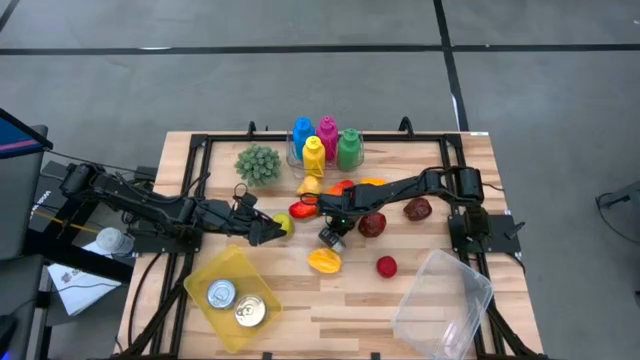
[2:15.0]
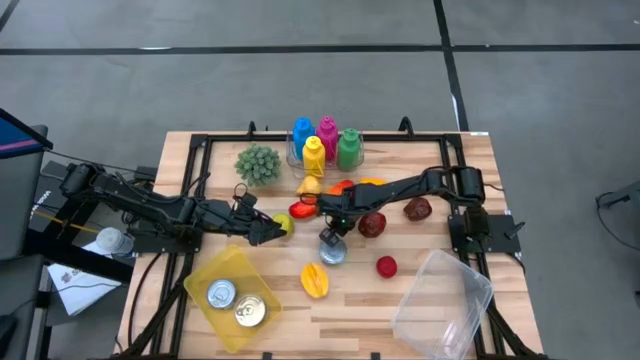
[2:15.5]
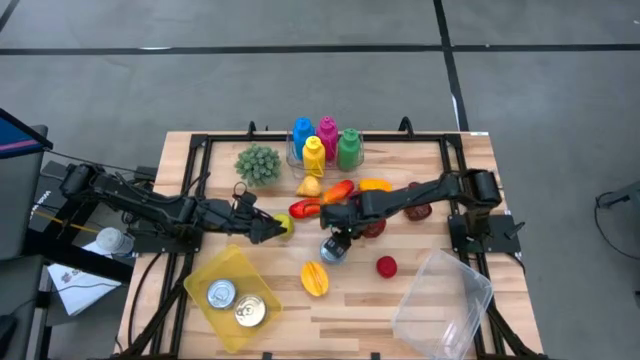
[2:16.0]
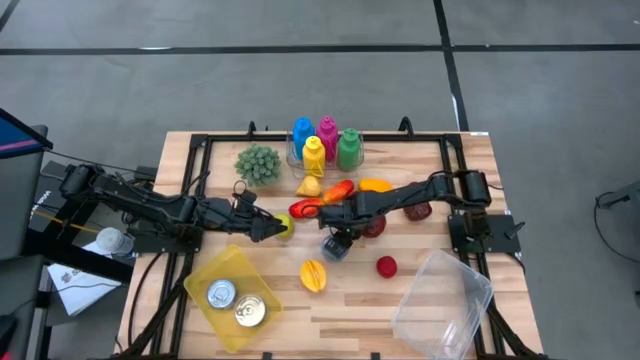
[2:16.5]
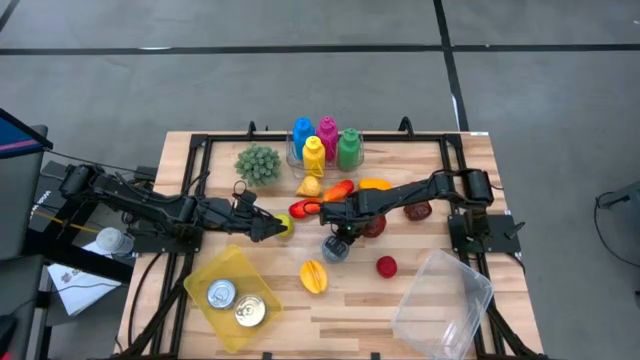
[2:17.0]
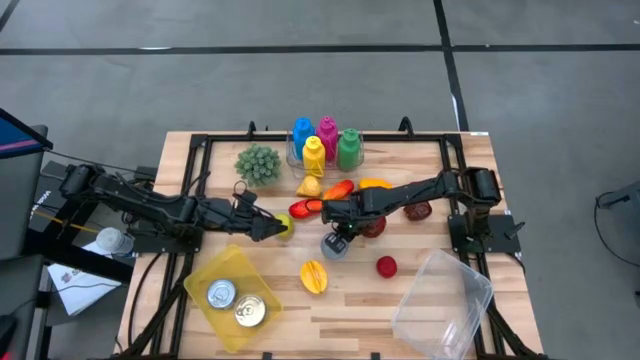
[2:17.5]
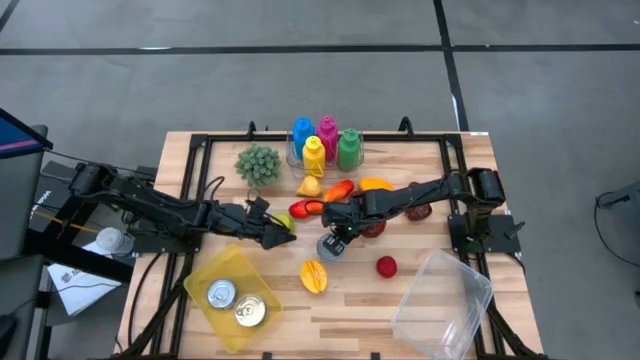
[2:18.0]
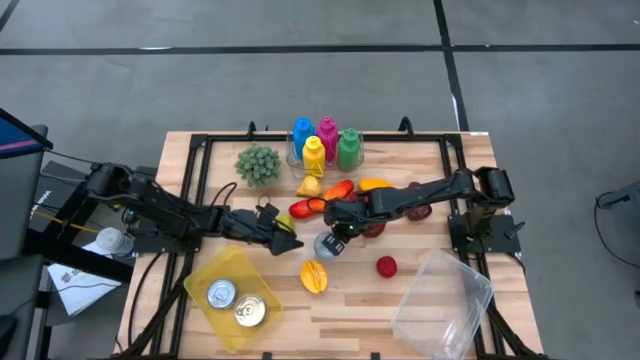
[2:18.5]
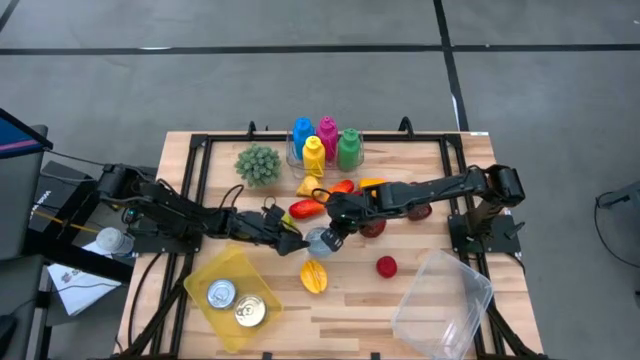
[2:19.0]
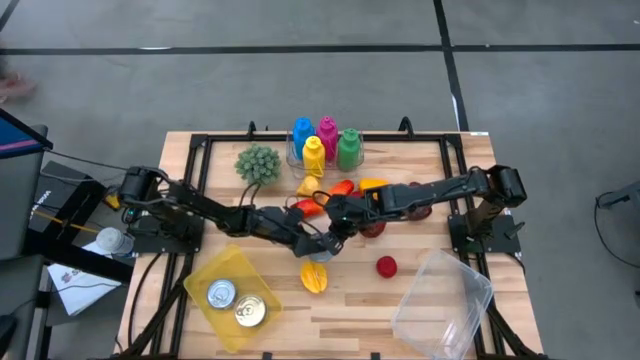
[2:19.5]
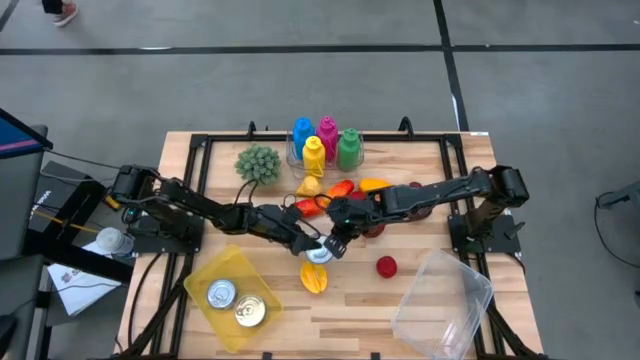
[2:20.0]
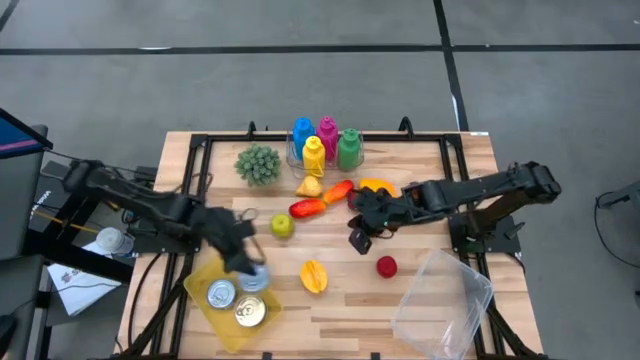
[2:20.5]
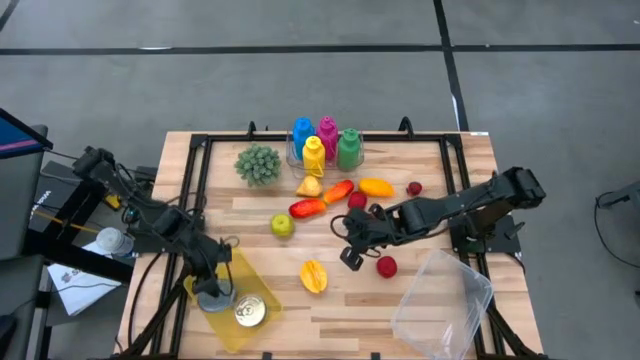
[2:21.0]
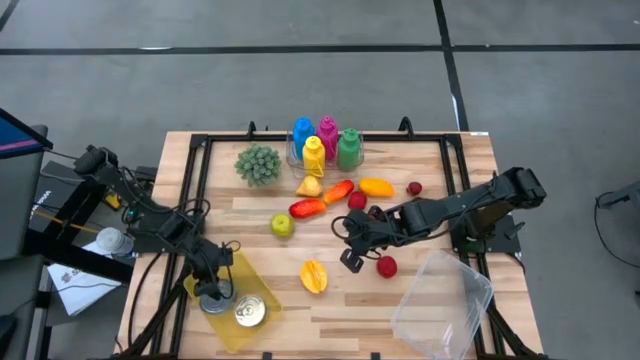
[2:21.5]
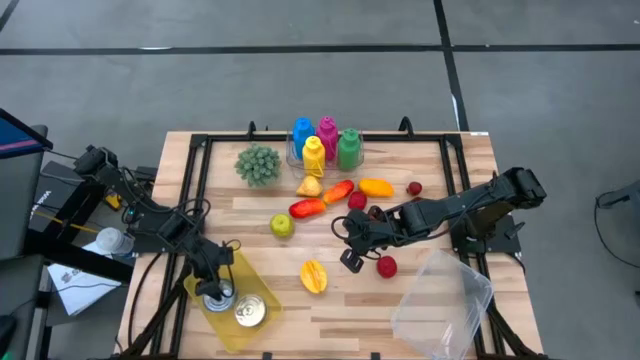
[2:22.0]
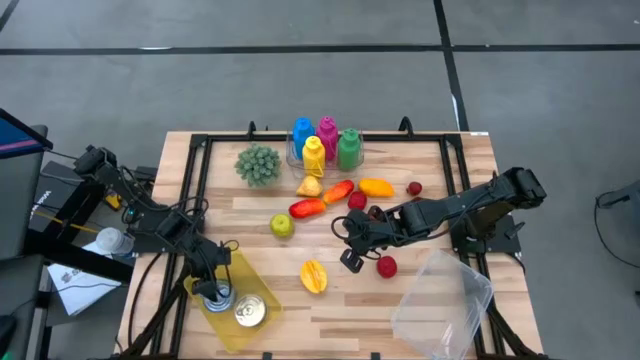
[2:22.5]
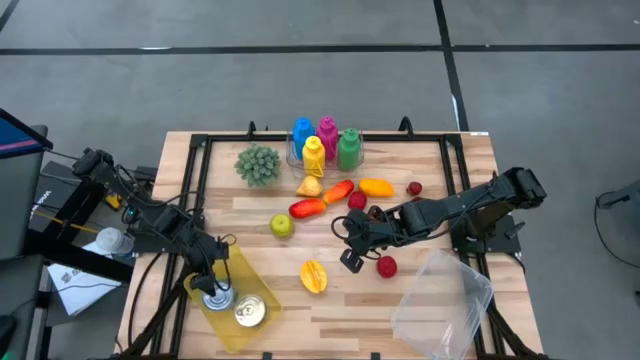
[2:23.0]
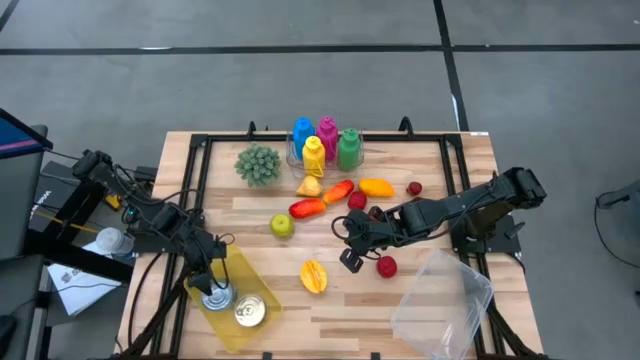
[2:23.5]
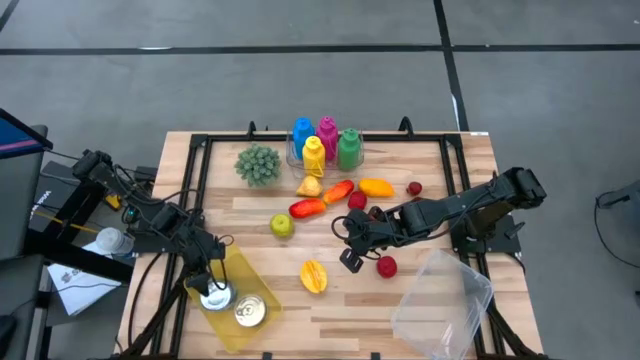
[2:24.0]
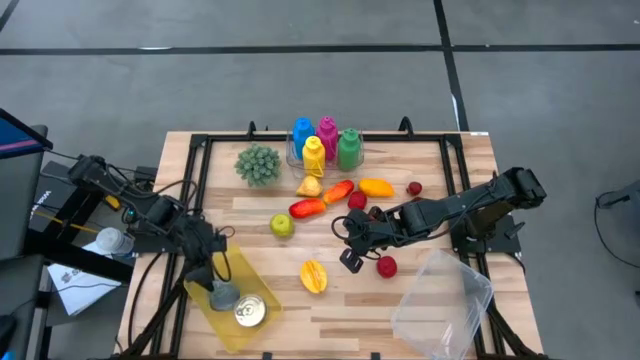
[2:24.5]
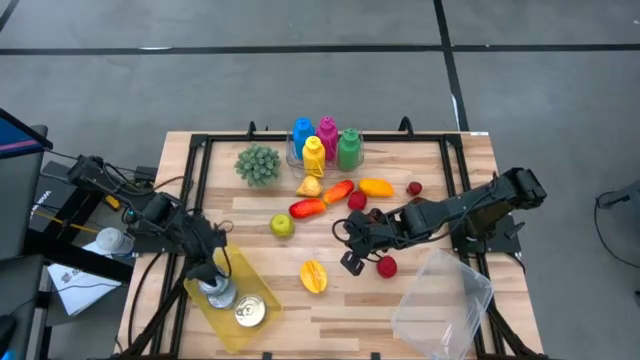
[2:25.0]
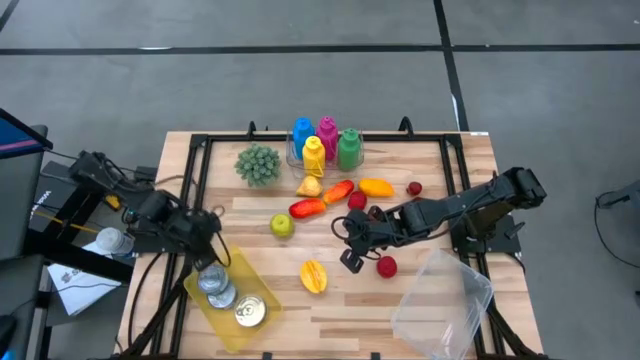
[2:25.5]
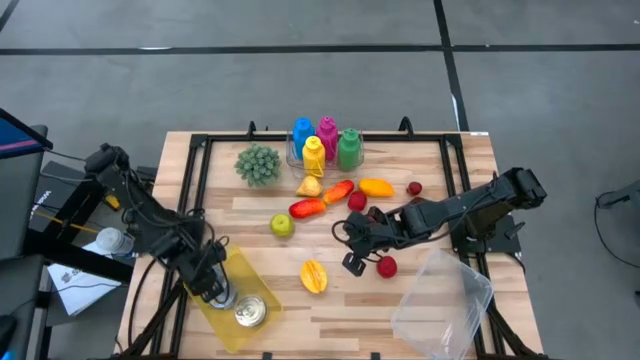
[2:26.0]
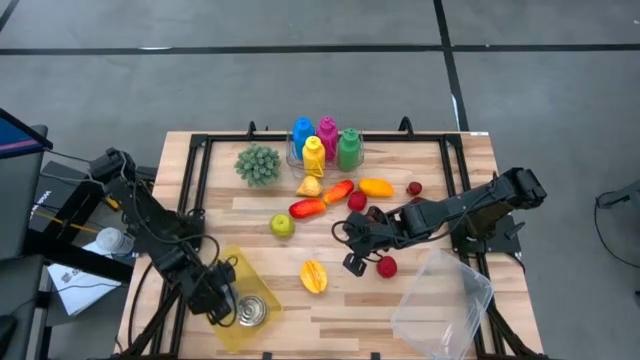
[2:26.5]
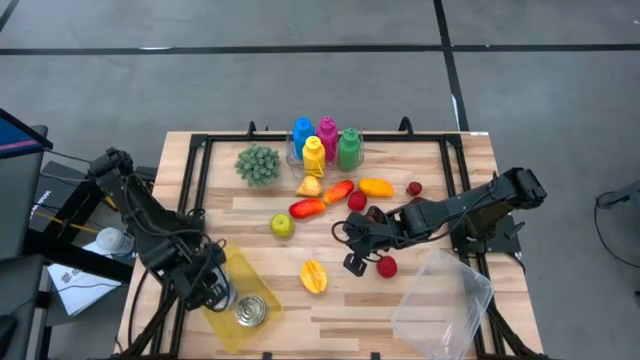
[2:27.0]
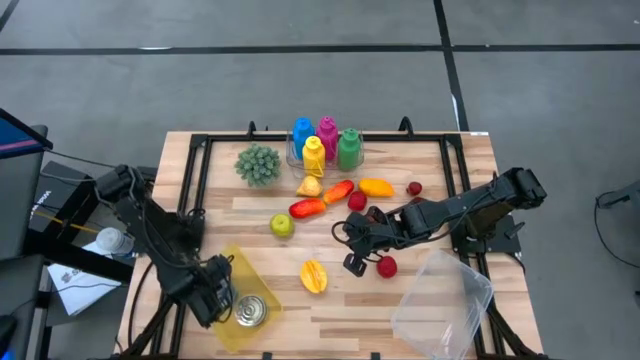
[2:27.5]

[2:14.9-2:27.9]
Task: Pick & Place Food Item
Put the green tuna can into the yellow bin

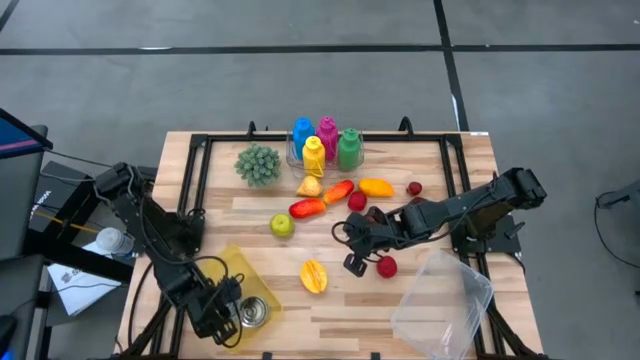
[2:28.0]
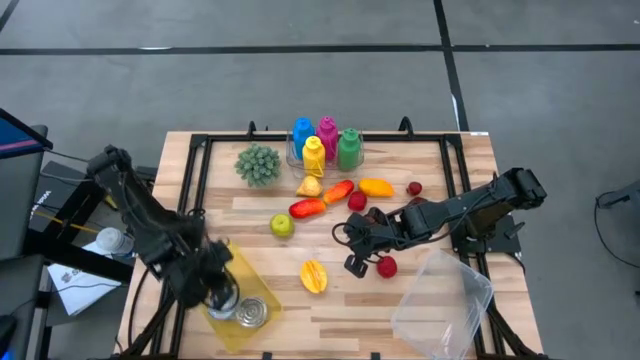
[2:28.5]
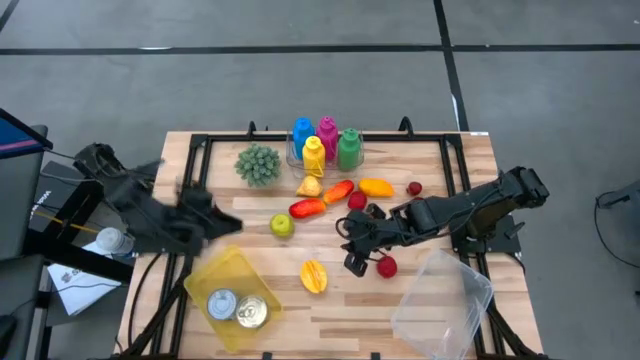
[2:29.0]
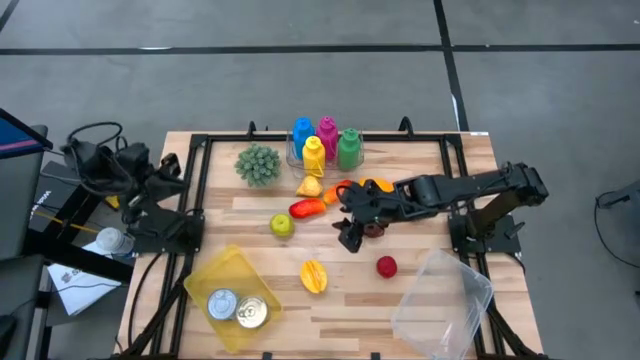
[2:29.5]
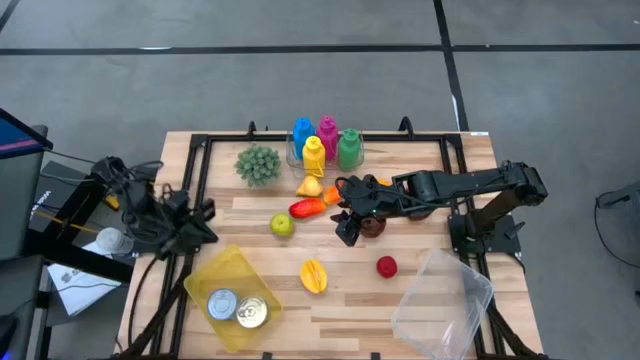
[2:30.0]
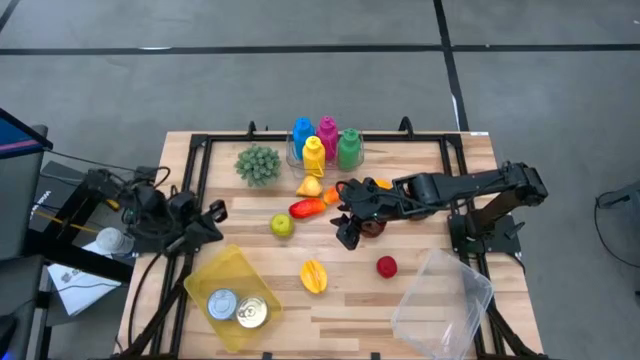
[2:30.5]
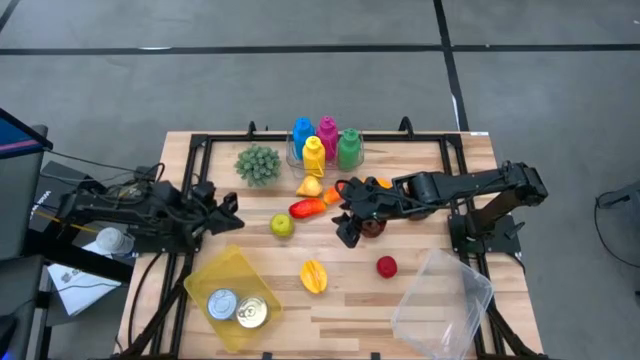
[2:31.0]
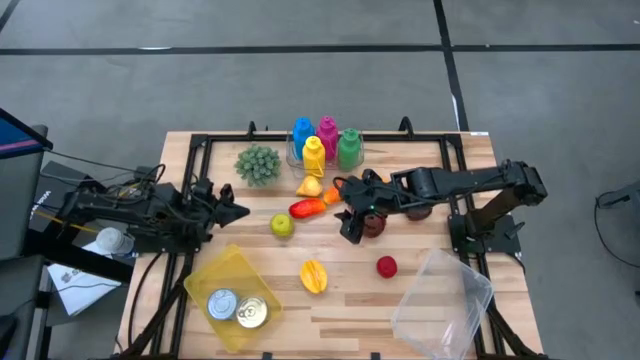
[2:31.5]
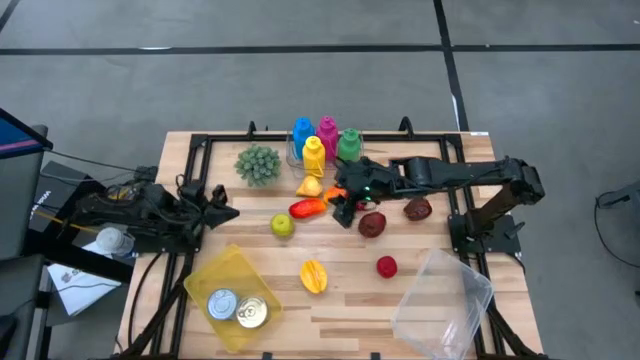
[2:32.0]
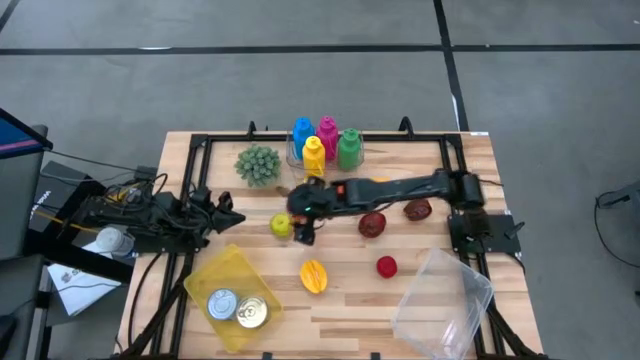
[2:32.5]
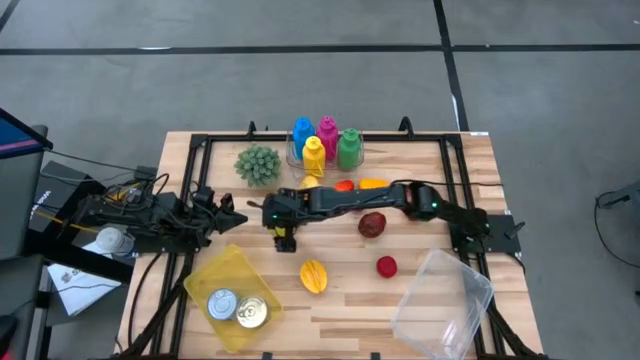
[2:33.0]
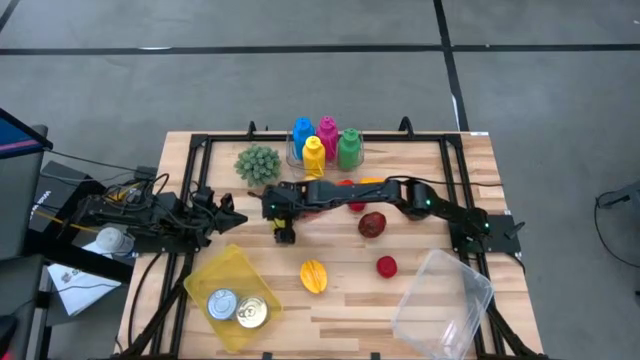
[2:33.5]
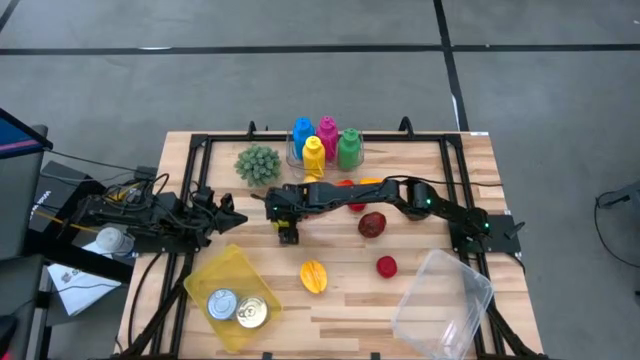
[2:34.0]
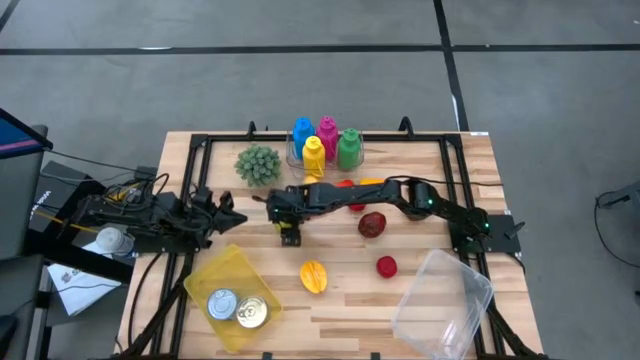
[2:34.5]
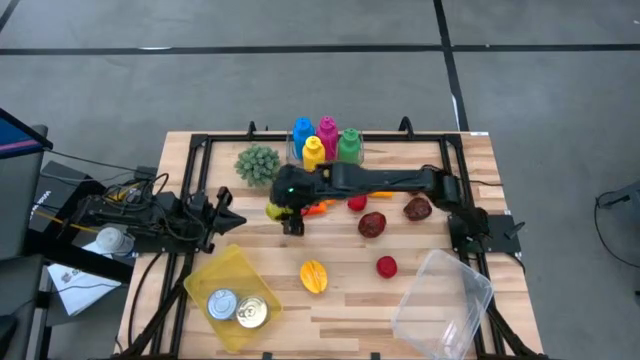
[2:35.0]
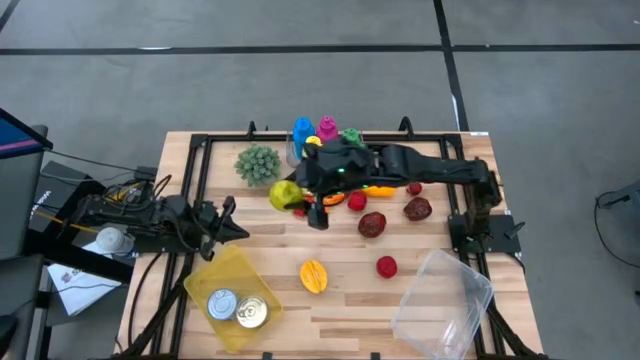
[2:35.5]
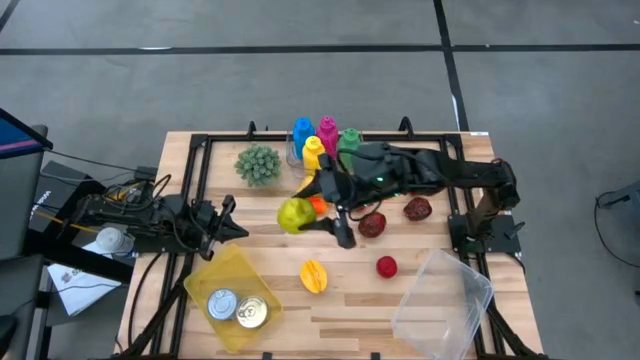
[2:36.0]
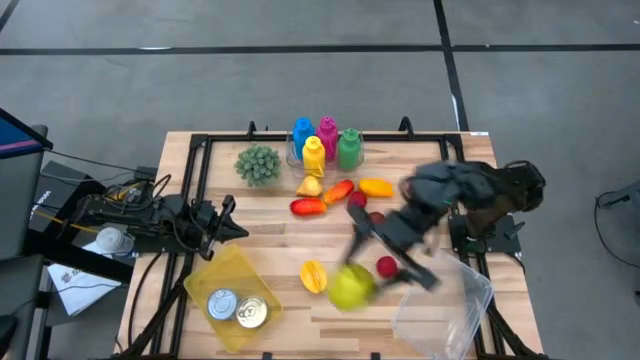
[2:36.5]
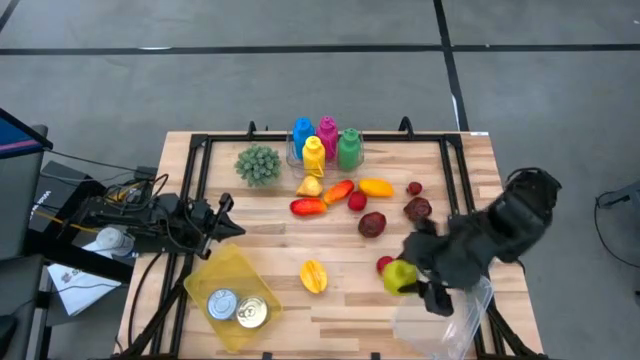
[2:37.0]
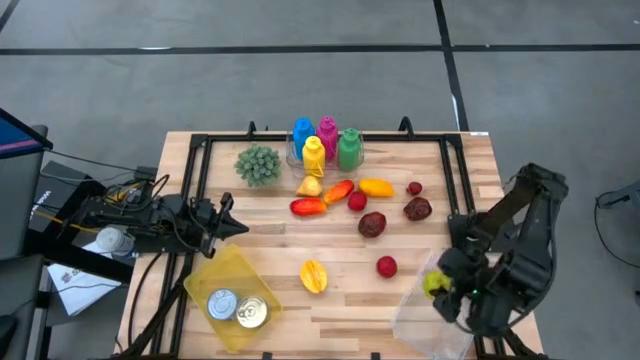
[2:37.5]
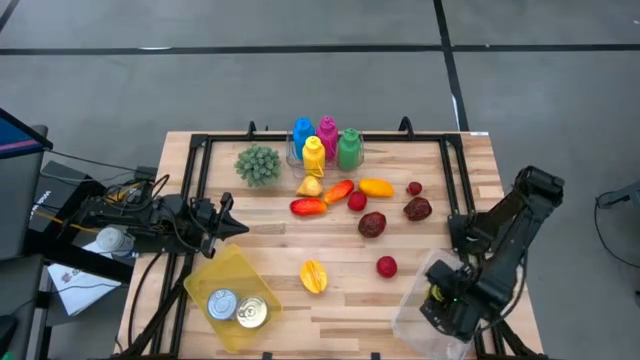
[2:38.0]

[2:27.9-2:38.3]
Put the green apple into the white bin
